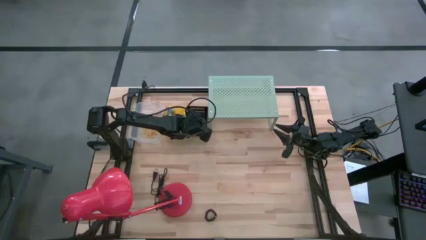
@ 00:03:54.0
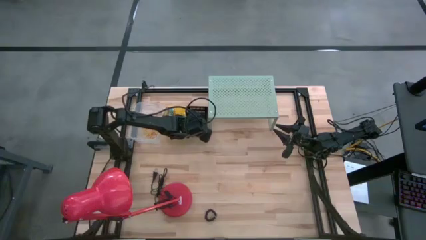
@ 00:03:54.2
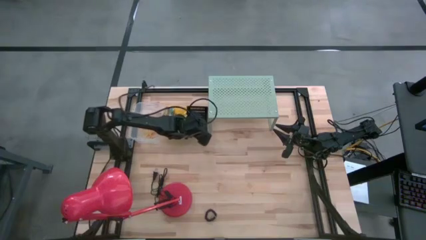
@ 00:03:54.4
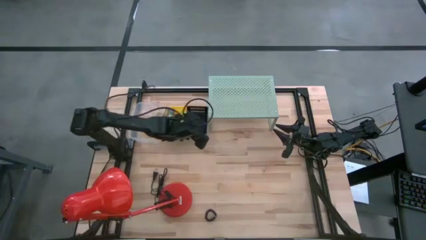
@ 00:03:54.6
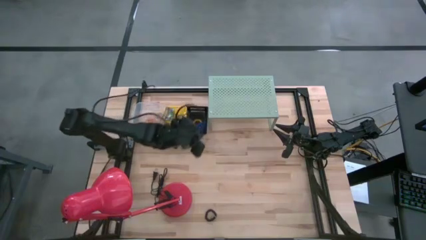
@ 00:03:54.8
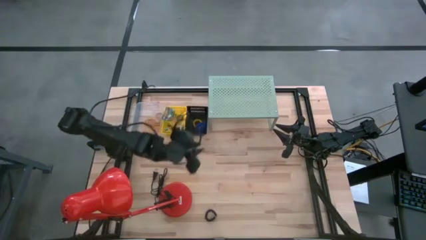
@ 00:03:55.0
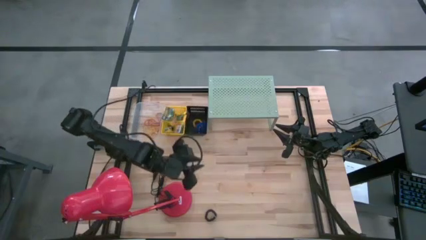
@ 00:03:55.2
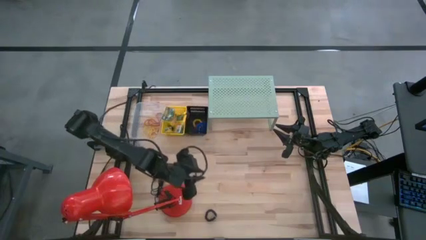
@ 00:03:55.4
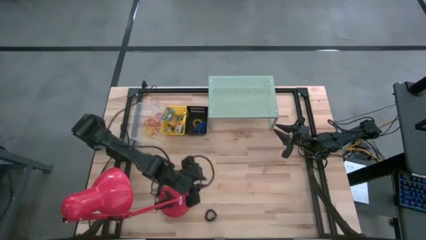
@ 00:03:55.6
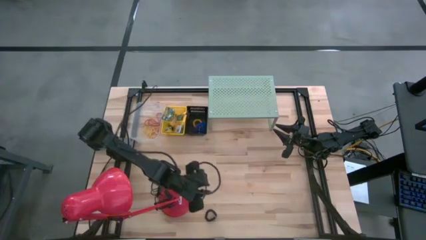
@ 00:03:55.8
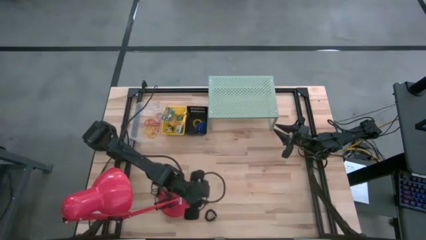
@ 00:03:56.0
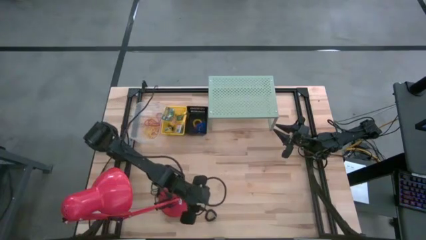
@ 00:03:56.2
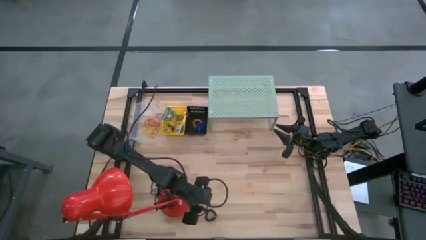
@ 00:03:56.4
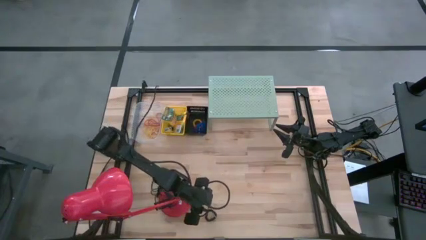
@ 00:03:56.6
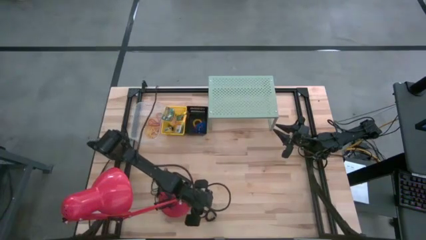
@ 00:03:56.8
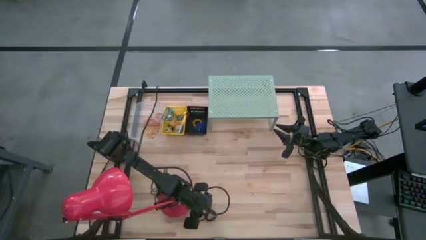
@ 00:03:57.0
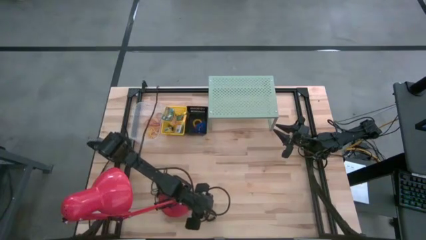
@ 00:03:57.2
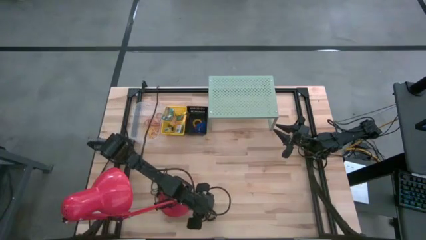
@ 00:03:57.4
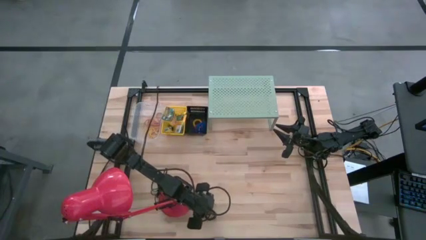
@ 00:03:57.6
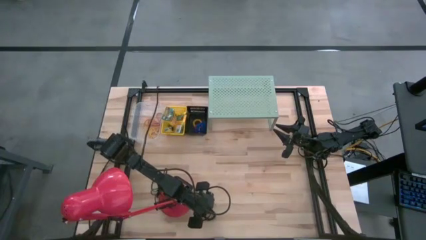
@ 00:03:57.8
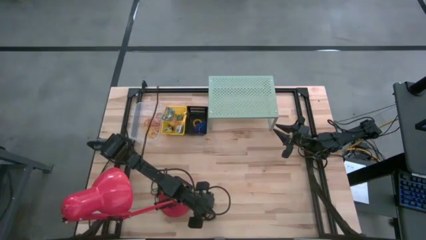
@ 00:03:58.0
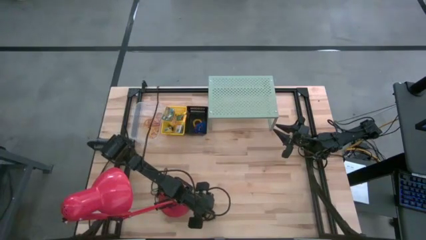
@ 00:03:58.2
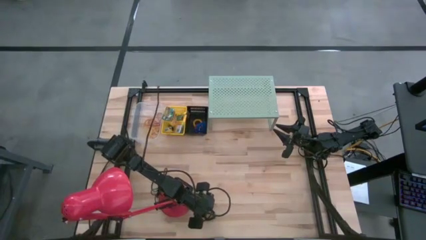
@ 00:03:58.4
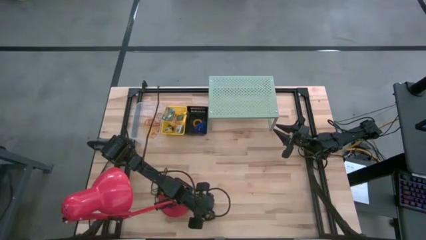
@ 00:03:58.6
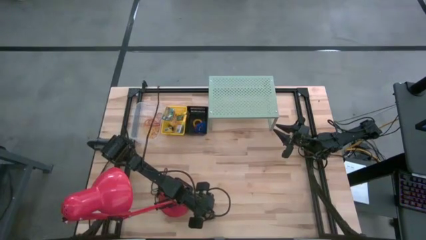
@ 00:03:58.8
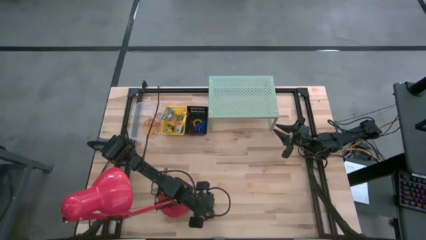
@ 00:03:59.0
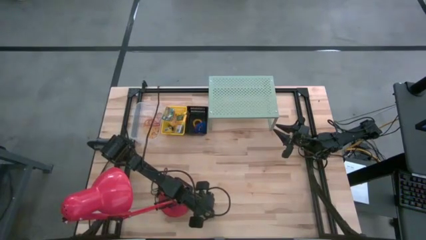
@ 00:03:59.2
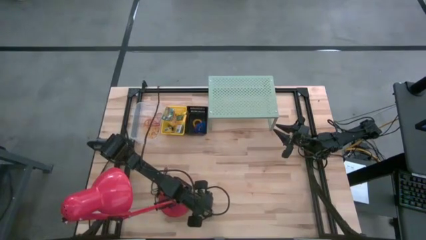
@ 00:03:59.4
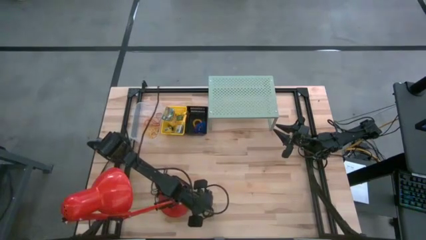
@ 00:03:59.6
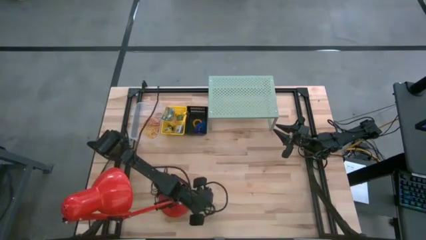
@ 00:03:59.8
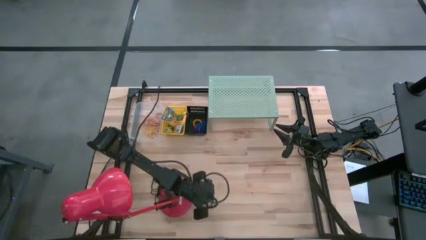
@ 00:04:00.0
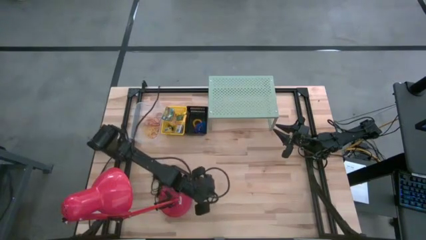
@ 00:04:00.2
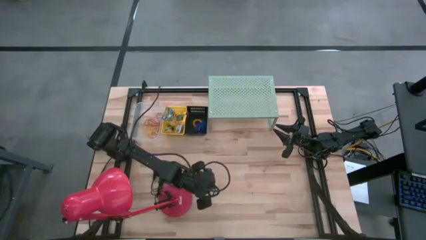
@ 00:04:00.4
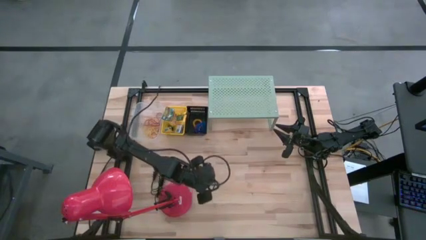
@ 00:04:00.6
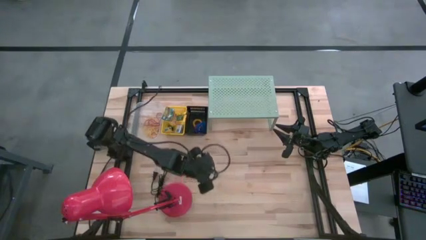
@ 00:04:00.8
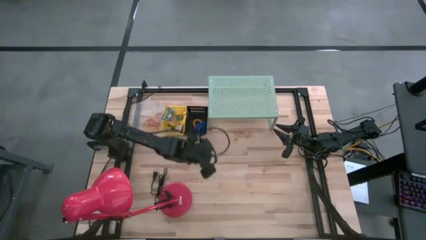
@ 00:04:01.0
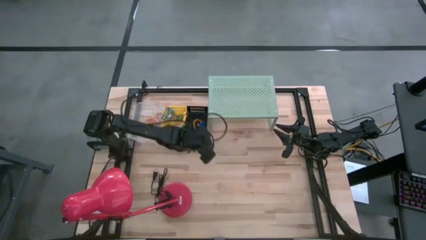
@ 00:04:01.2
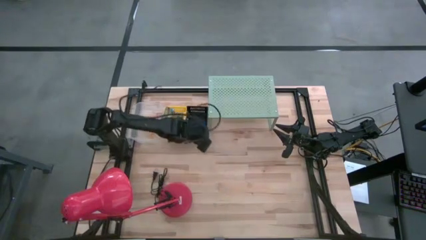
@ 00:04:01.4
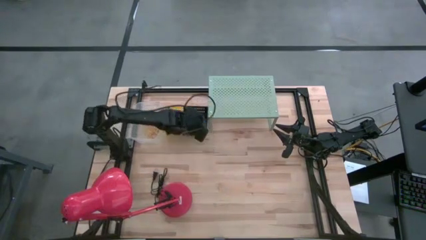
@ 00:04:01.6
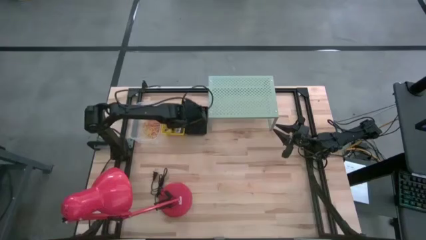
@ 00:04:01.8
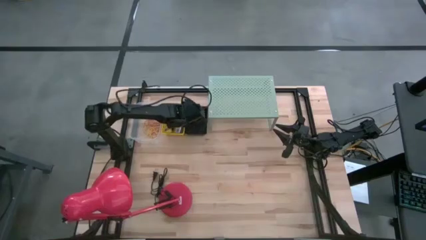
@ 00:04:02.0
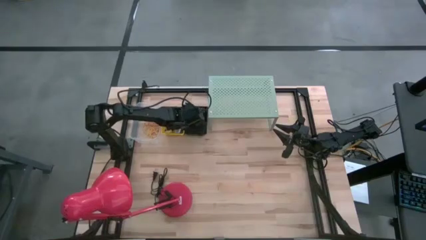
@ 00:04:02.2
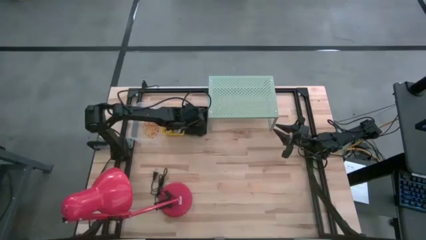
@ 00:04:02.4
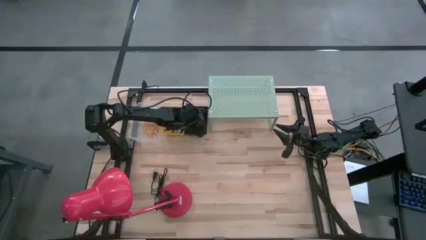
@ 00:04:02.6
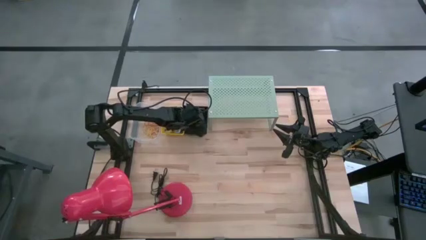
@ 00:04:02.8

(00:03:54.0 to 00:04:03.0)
Task: Pick & Place Office Desk Supplies
Put the black spring rubber band into the black bin

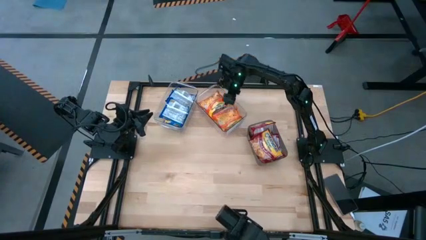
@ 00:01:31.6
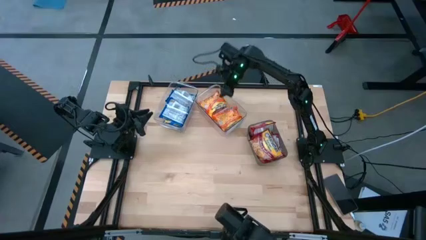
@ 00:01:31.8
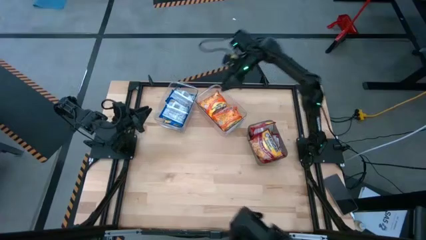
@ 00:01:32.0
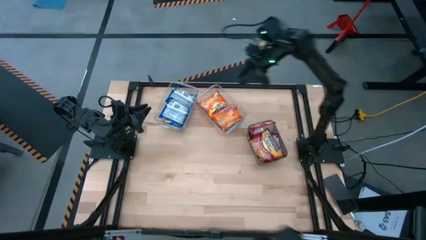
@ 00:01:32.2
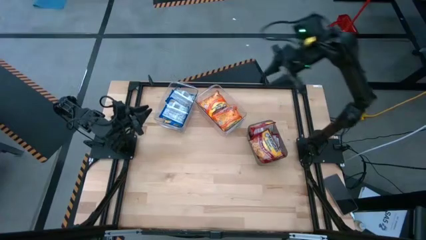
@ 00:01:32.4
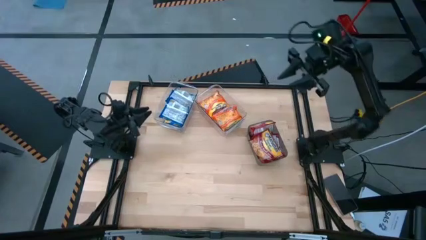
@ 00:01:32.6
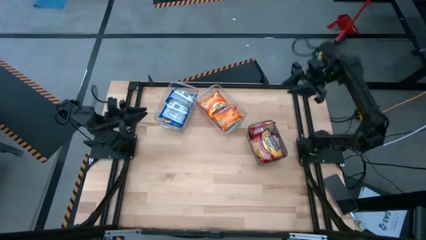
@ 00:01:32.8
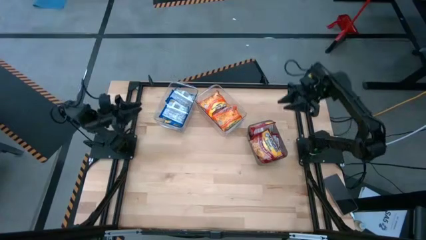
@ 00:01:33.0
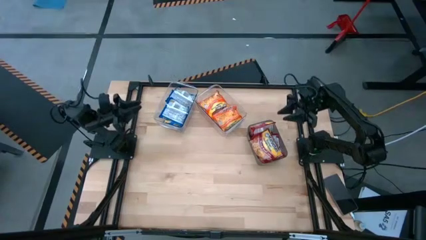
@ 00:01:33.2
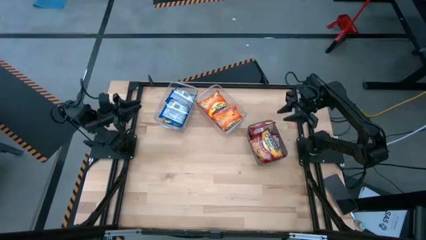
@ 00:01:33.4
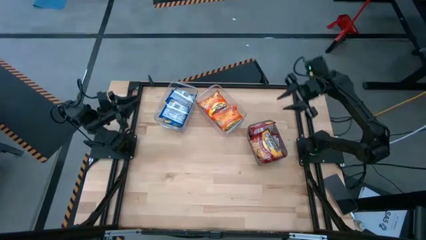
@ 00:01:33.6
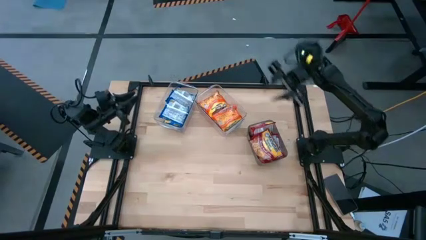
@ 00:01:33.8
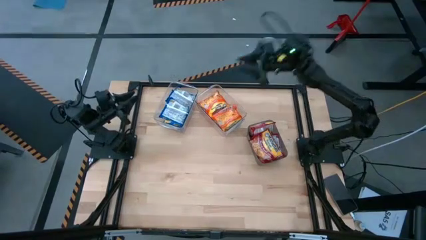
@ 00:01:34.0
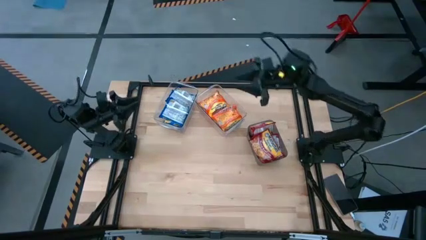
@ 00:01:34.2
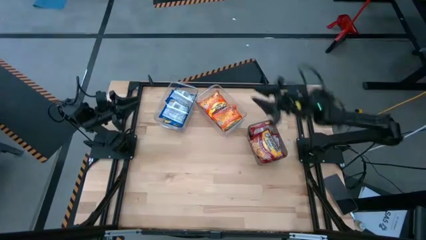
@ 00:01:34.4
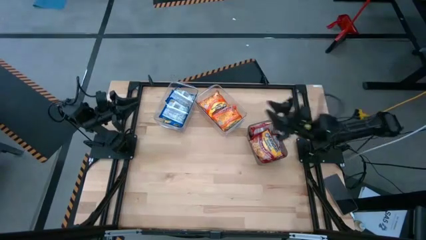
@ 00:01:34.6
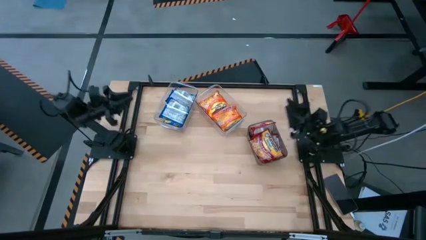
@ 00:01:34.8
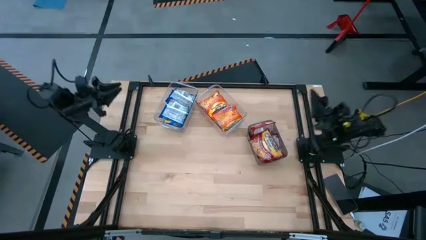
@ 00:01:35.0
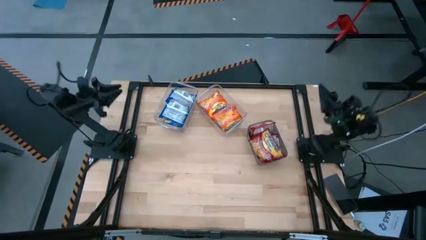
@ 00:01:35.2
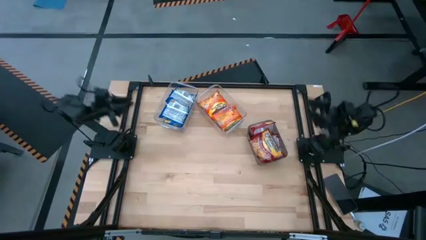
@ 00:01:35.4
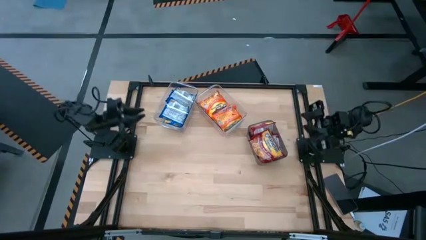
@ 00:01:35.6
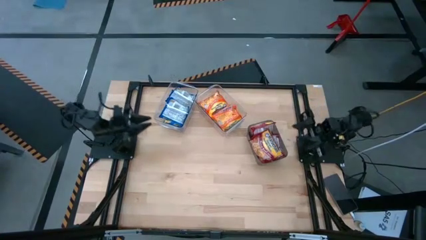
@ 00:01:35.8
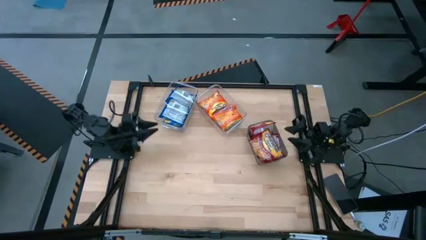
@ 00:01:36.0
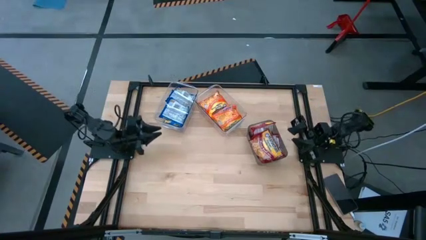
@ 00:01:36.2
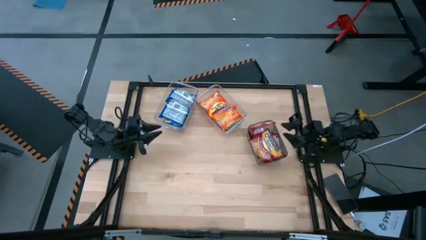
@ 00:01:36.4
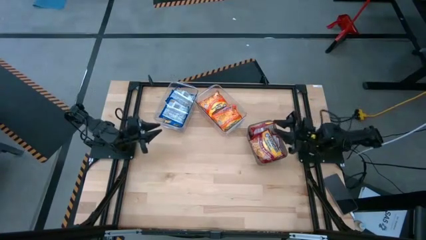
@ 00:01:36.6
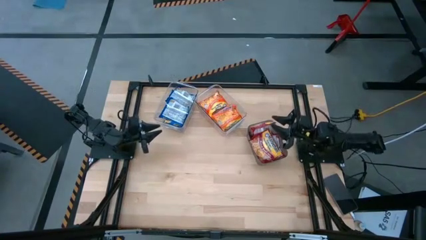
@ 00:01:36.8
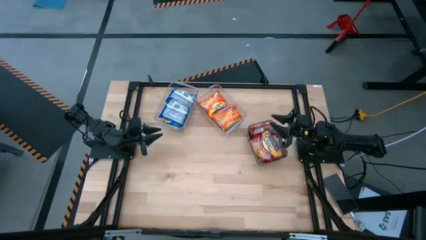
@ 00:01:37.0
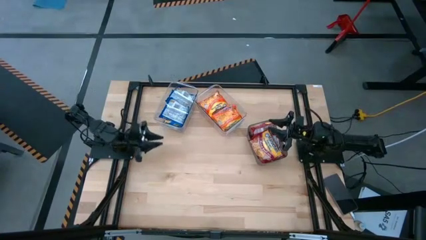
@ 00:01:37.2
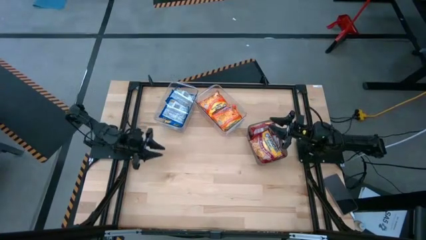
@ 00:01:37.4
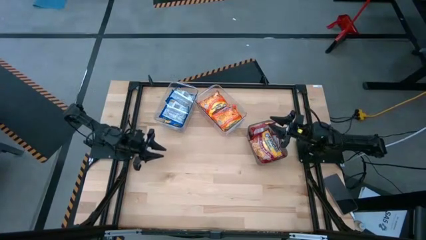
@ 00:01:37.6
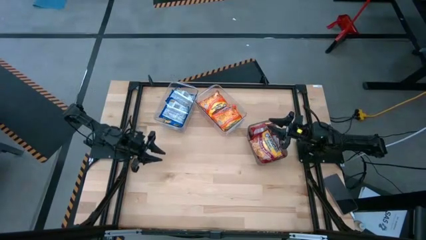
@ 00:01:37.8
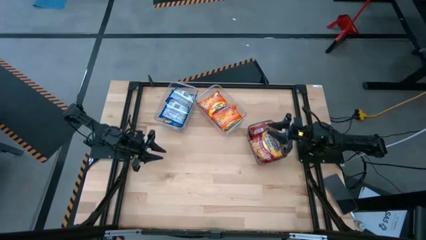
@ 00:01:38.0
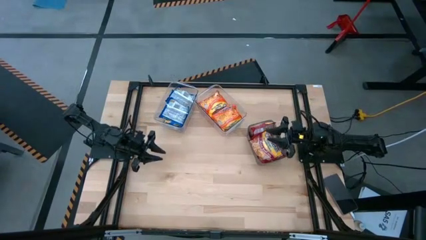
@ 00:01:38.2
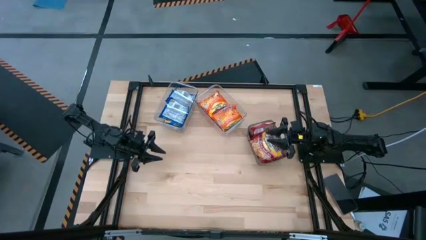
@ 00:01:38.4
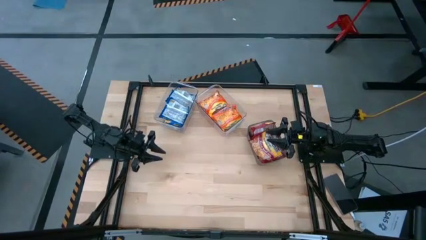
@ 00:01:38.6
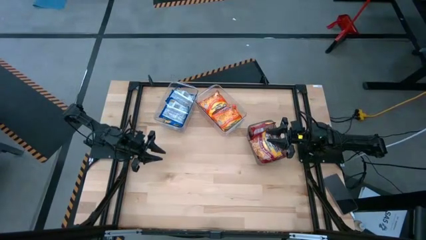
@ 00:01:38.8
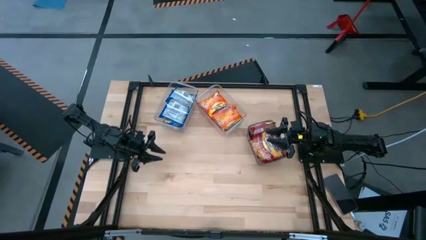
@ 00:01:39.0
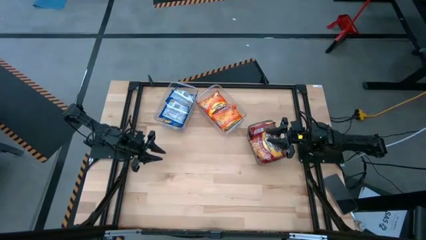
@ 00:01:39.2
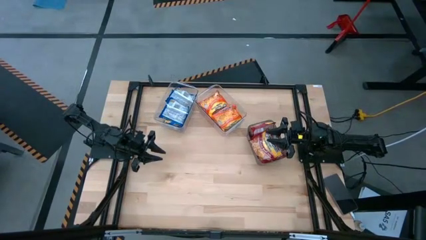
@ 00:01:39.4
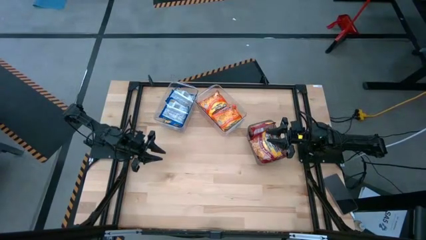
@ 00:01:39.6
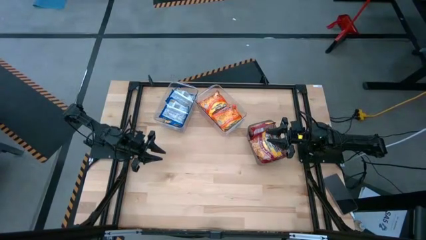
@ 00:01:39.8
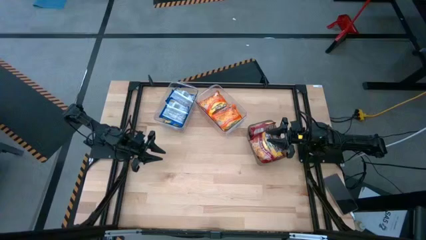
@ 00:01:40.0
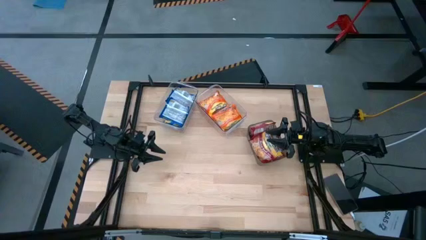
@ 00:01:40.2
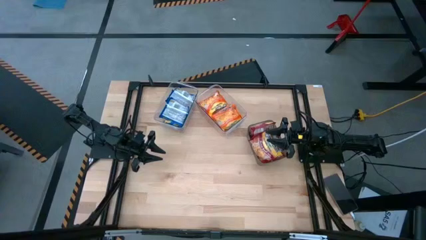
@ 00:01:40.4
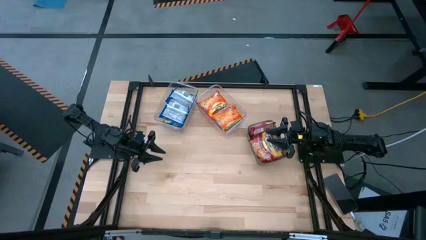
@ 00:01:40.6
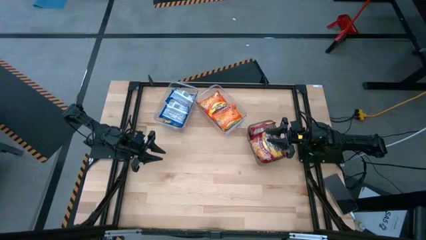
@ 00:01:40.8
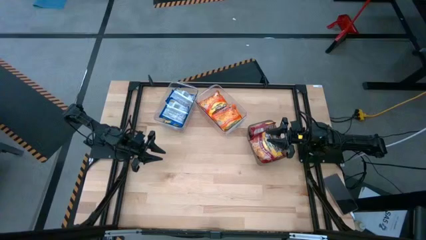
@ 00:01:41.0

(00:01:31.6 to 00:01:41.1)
Task: Sort Maruchan noodles
Return to Home Position
